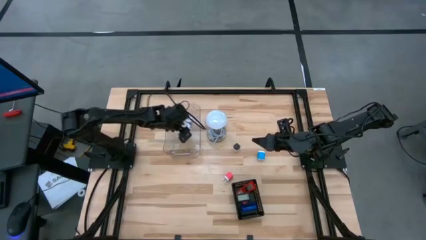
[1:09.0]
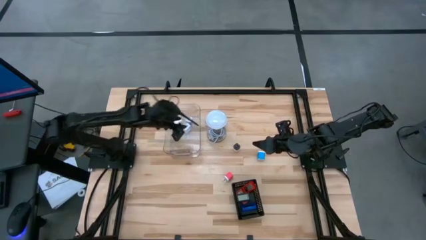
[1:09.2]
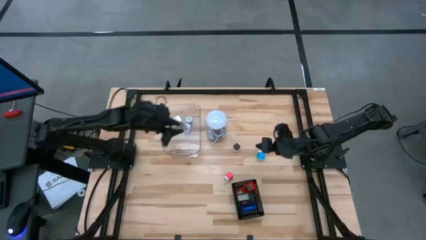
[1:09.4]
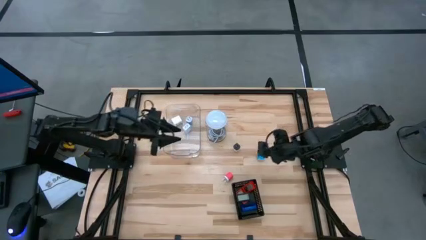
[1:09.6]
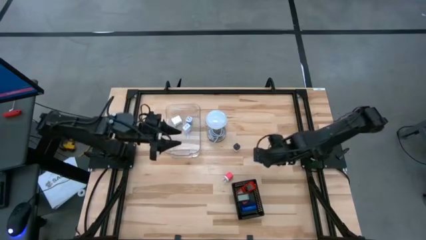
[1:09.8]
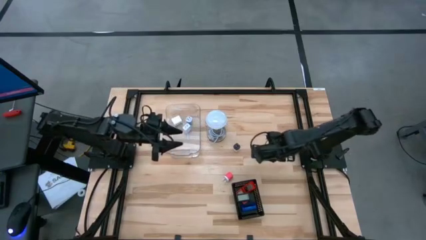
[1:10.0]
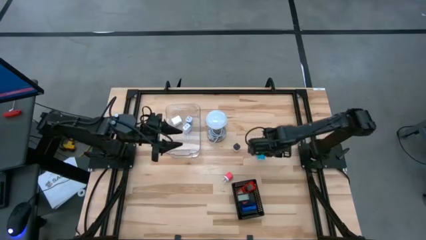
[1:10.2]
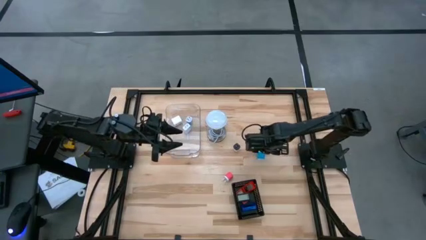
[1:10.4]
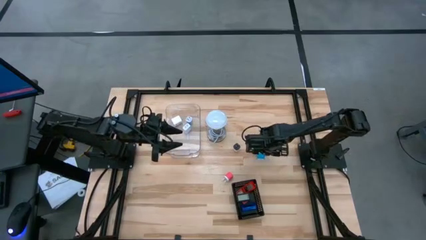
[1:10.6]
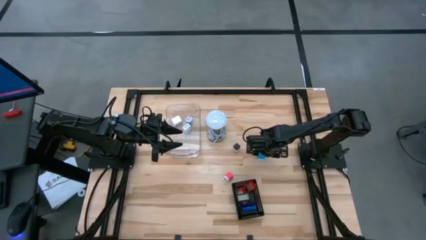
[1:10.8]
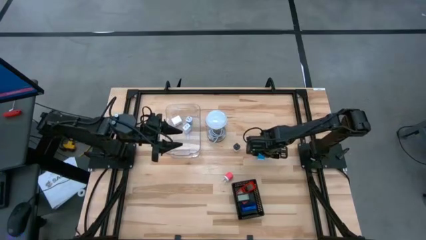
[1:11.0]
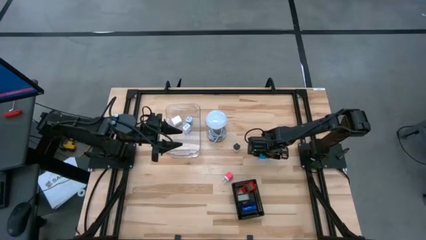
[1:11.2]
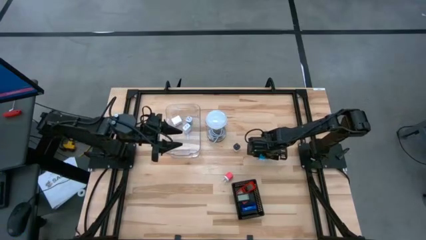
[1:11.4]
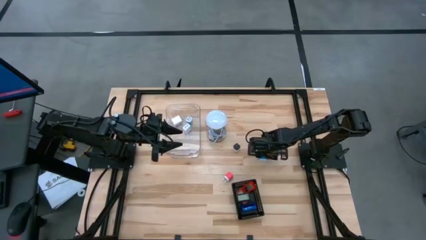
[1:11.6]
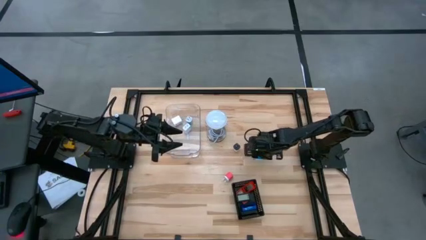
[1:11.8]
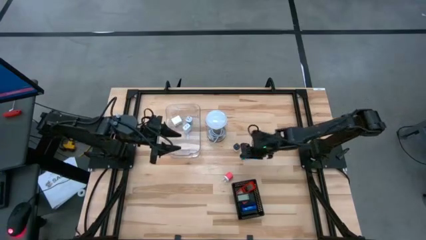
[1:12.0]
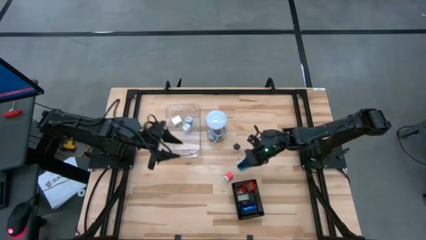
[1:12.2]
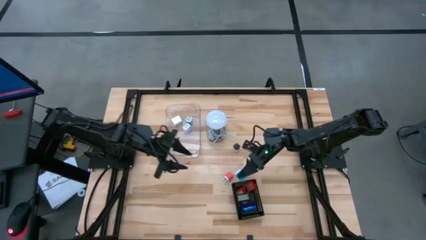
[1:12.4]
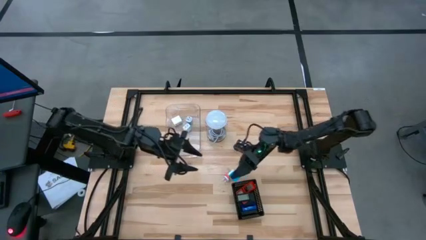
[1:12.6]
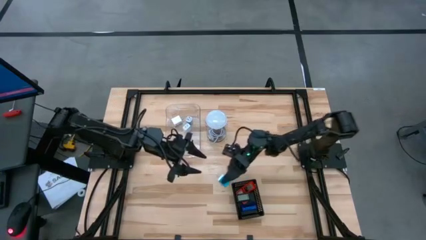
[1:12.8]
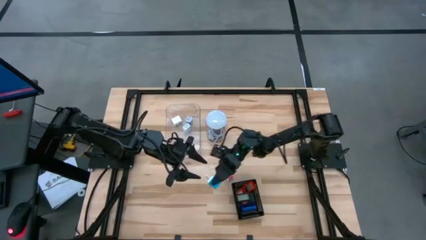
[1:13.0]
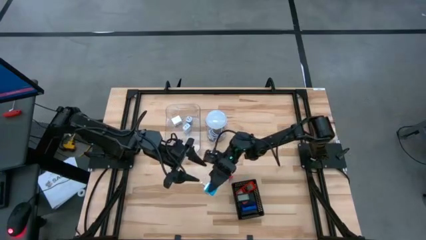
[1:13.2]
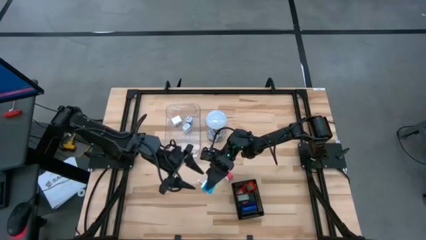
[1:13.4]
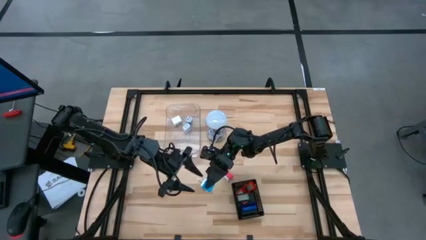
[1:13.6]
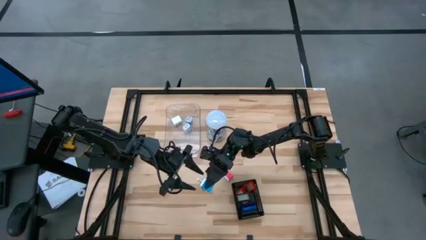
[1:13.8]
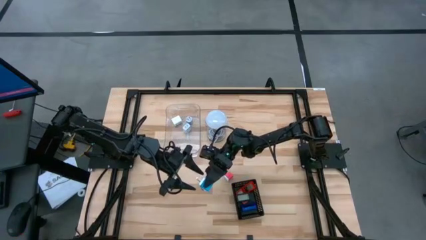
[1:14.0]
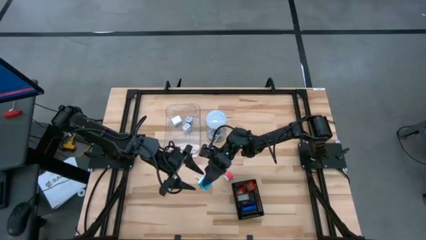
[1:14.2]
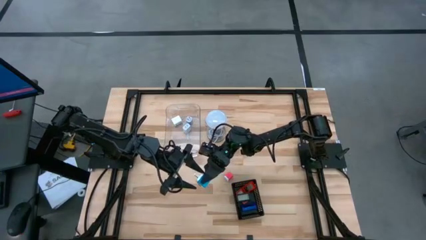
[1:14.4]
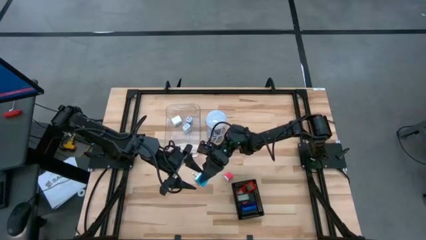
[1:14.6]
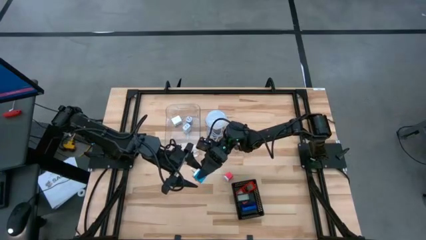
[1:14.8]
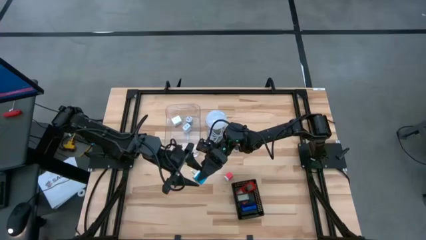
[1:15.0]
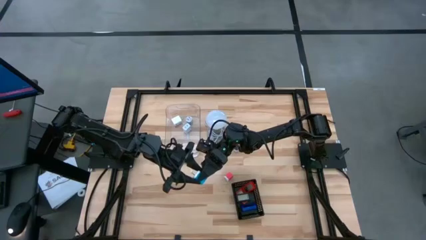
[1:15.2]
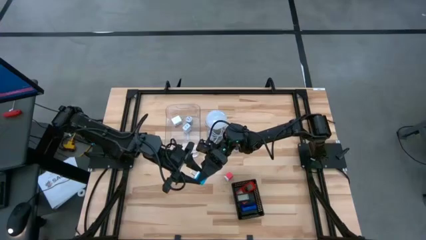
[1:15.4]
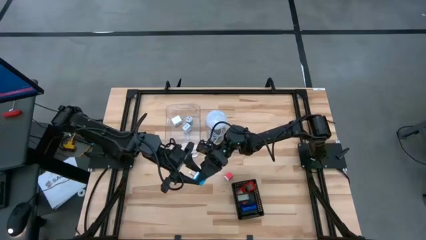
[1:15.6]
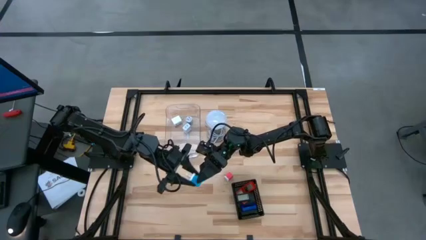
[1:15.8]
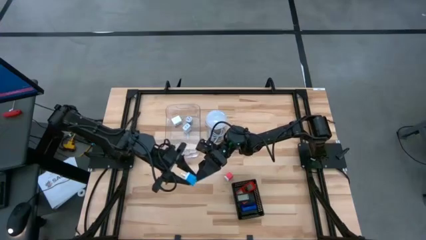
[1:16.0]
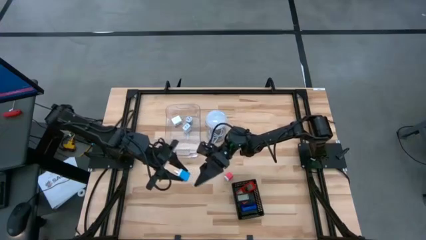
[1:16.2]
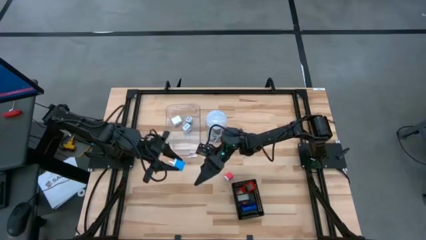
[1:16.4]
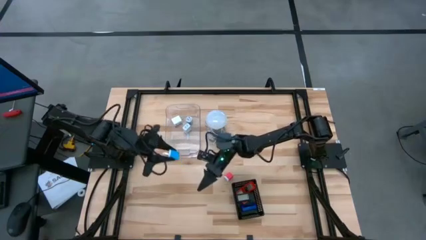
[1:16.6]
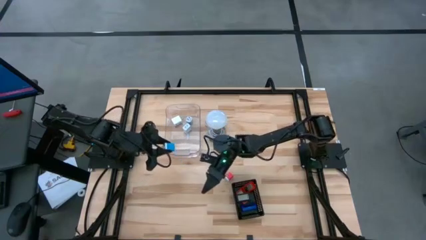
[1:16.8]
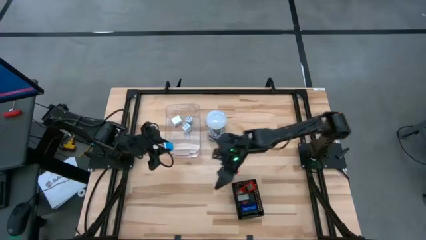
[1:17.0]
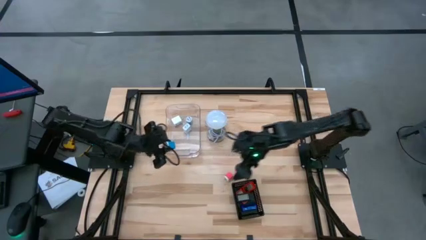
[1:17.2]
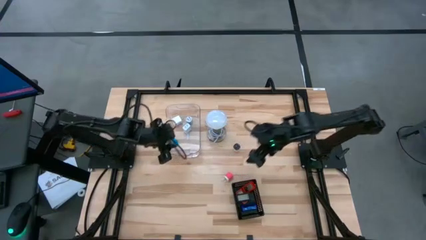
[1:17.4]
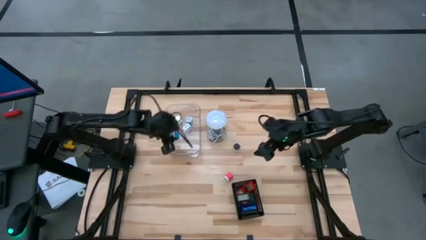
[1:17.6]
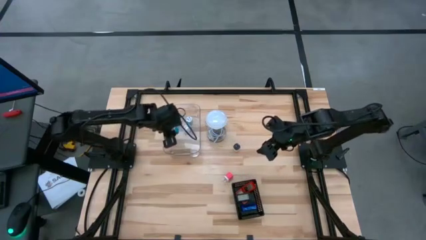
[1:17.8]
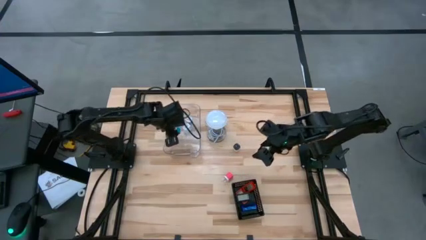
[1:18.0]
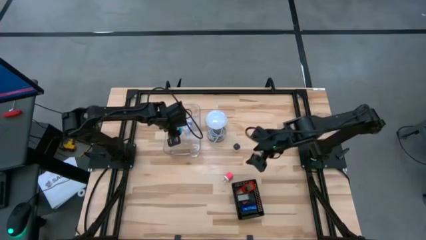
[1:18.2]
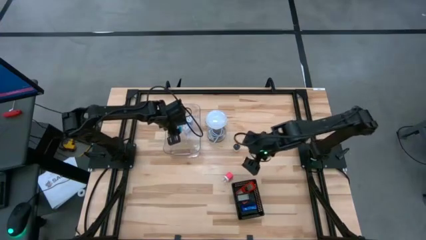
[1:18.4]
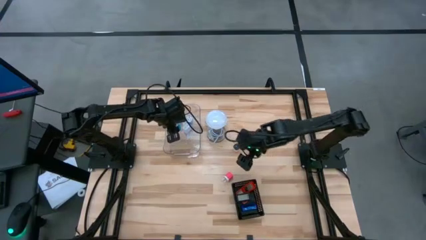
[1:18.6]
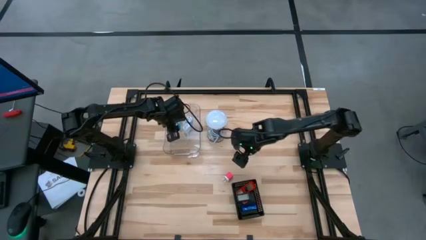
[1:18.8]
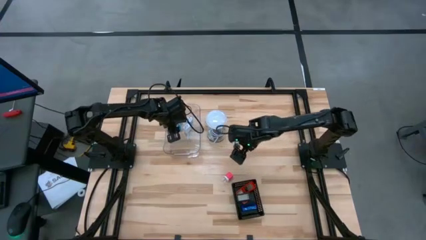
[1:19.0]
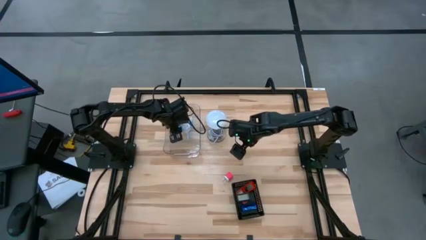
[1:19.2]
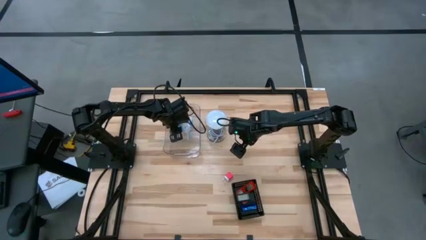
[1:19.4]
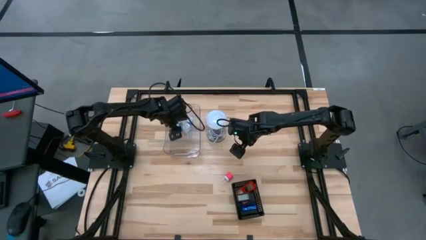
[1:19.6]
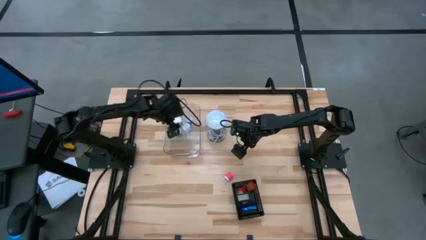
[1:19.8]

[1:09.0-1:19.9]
Task: Pick & Place Office items
Put the blue charger adapter into the transparent bin

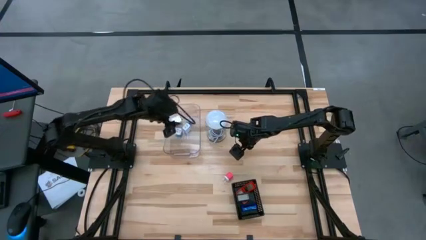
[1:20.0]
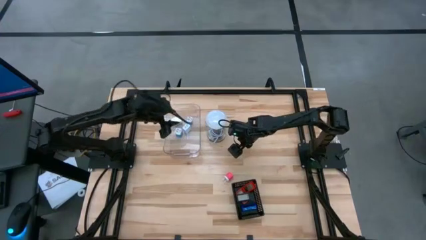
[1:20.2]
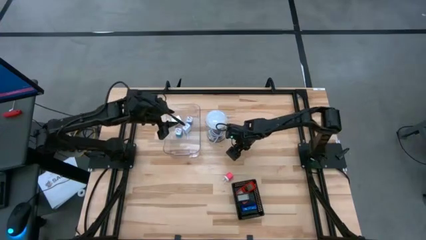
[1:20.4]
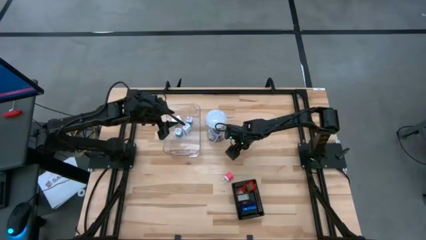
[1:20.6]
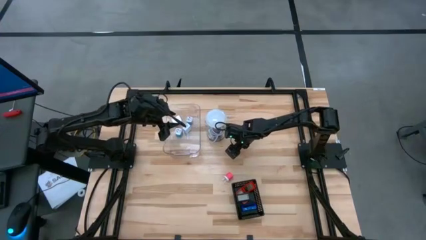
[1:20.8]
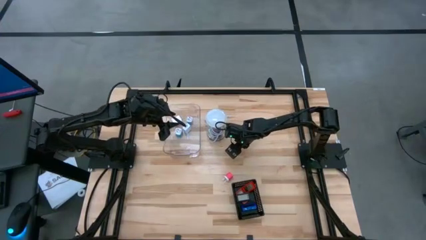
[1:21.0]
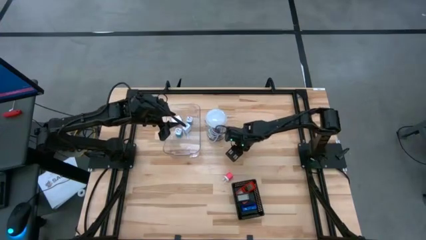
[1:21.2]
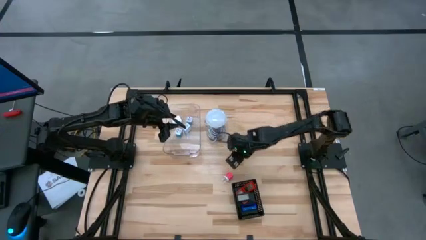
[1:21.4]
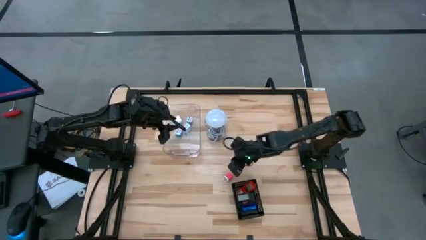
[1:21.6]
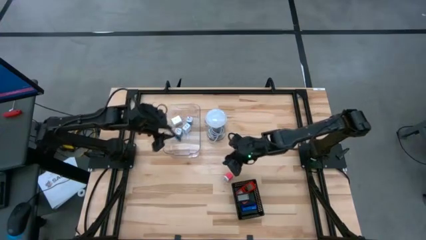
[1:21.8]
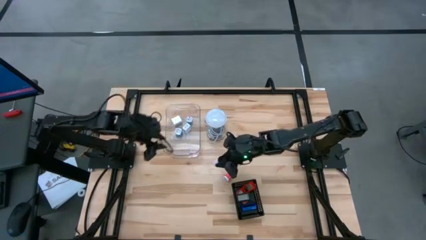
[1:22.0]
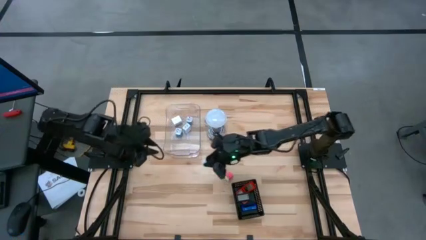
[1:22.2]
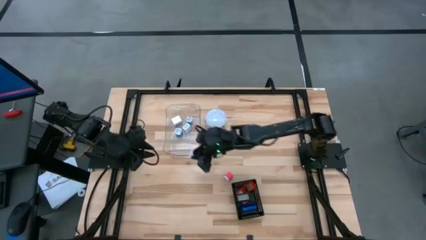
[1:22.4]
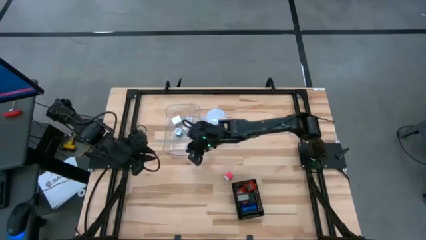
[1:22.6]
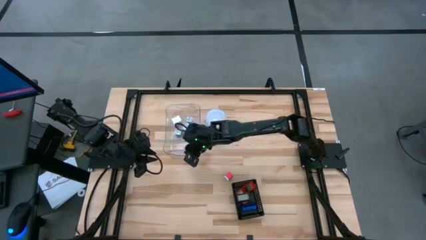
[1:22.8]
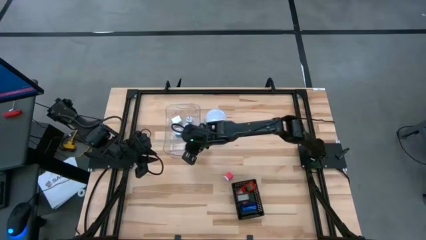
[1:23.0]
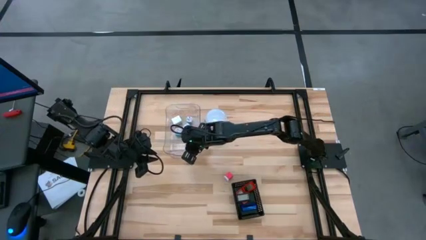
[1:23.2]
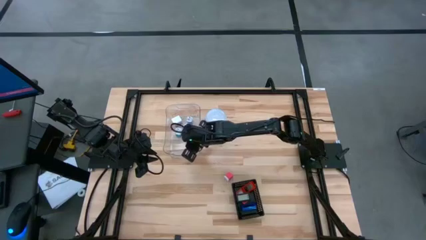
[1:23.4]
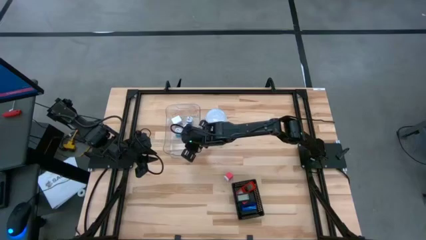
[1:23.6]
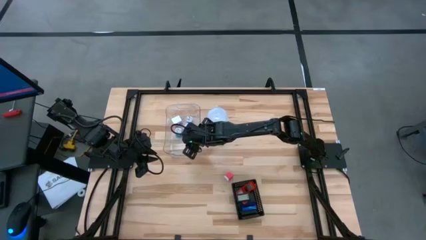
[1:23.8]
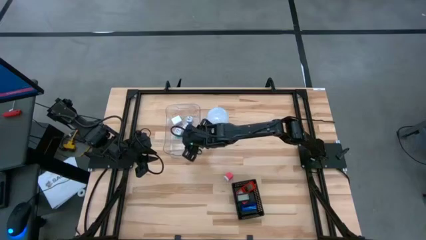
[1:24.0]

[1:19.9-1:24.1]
Put the white and black charger adapter into the transparent bin
